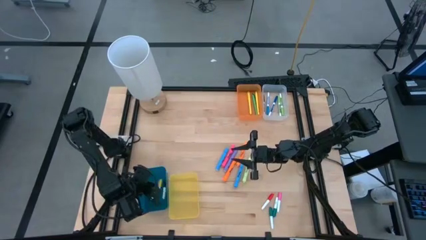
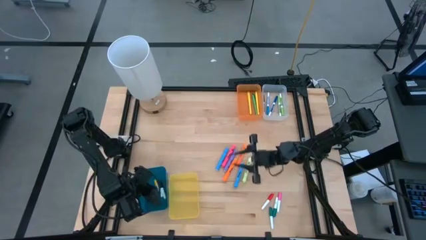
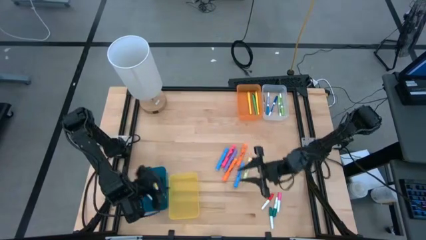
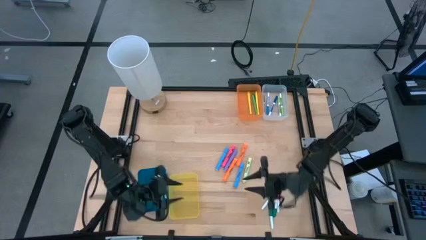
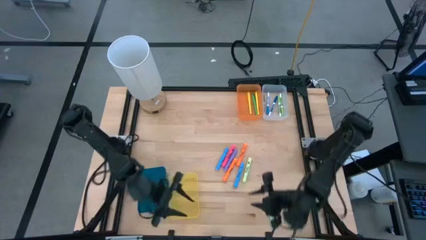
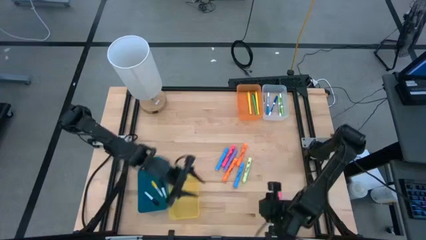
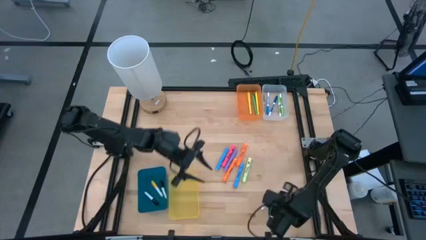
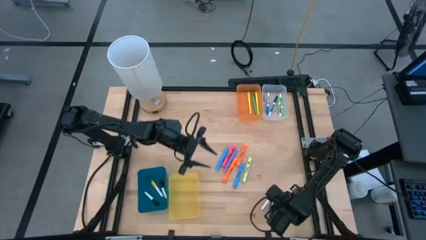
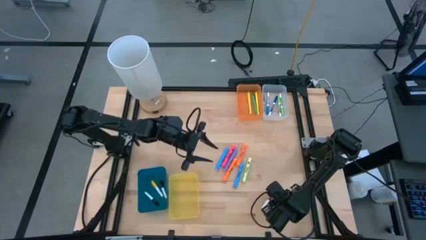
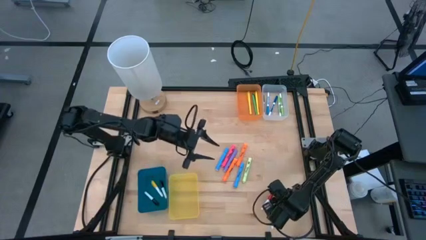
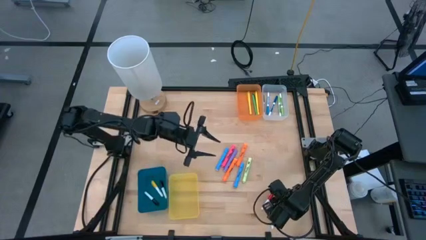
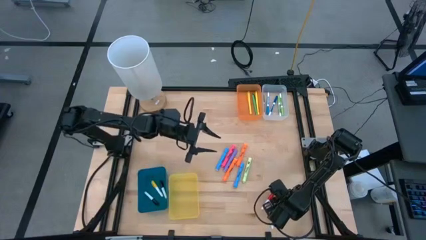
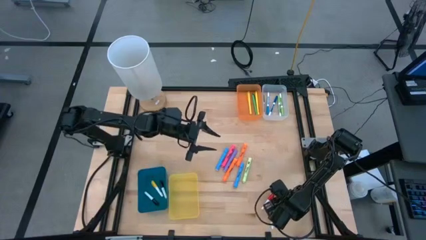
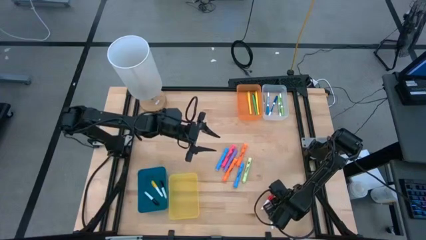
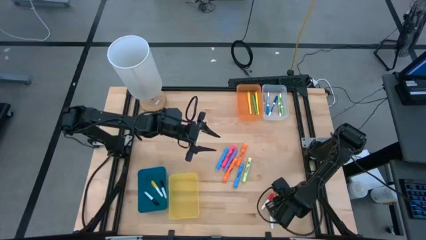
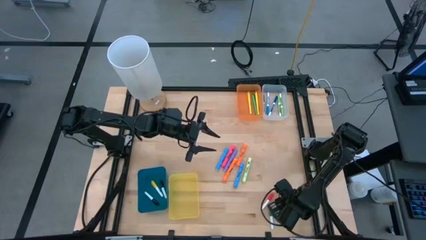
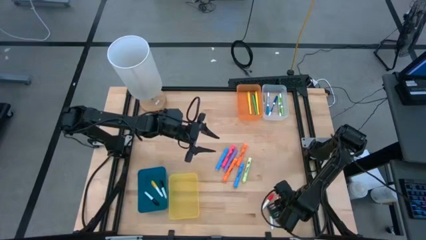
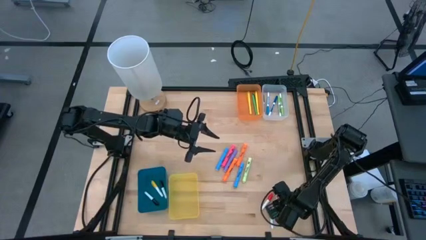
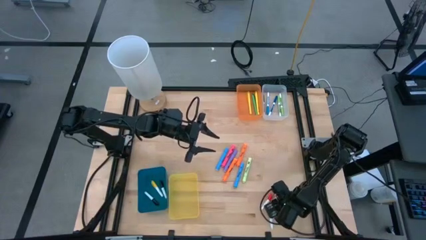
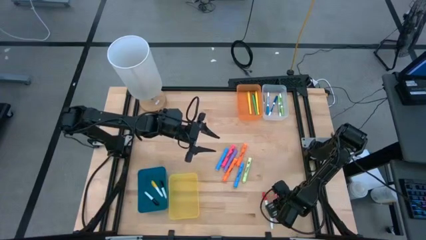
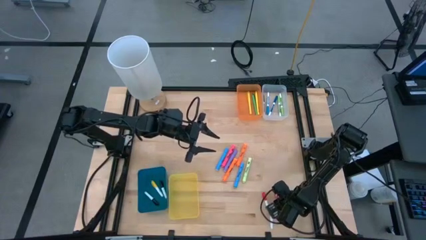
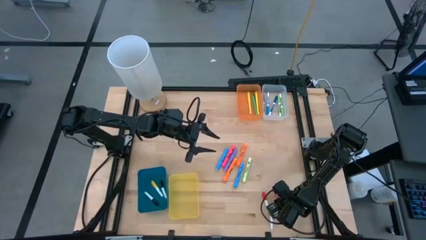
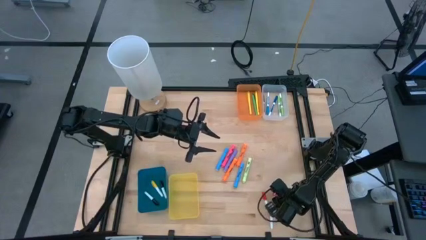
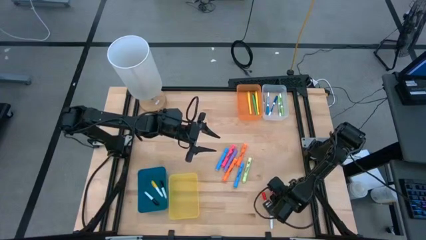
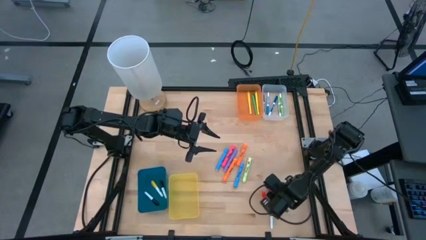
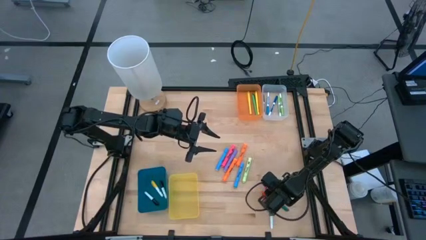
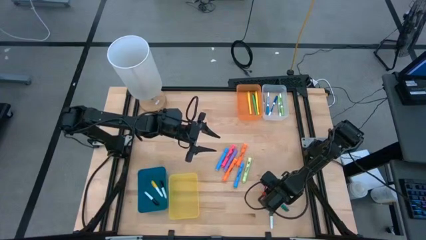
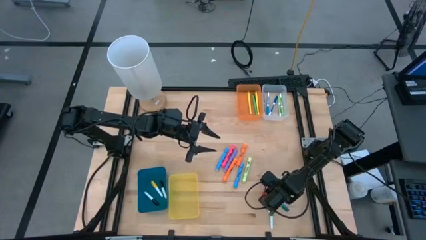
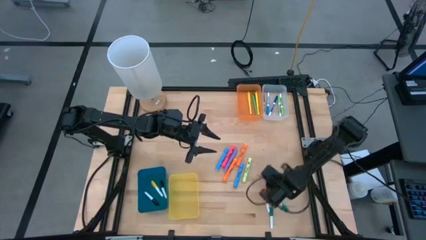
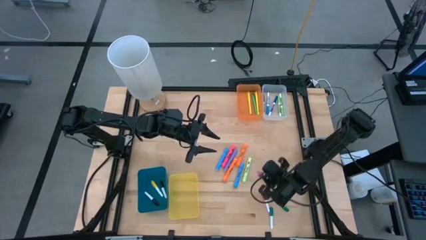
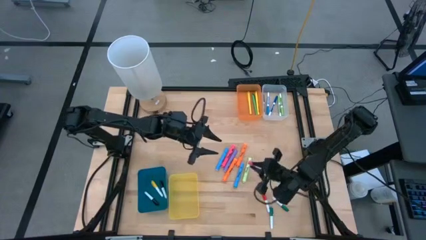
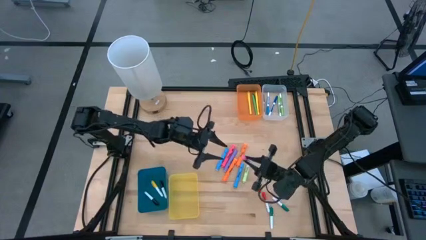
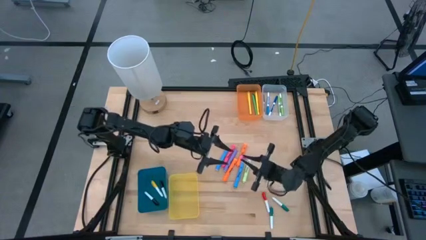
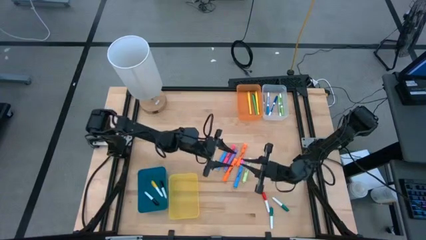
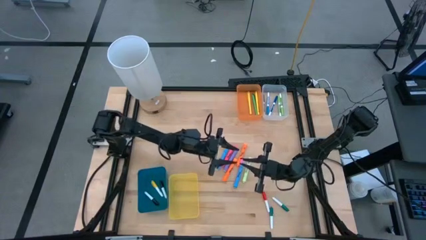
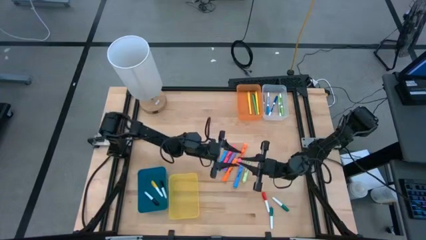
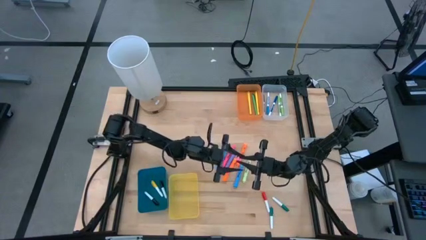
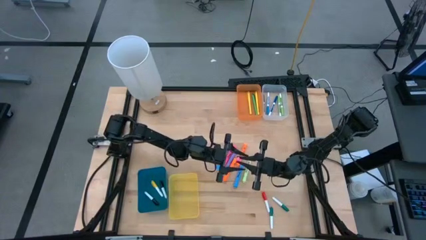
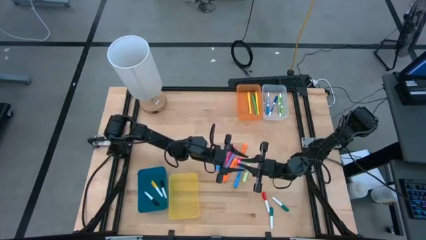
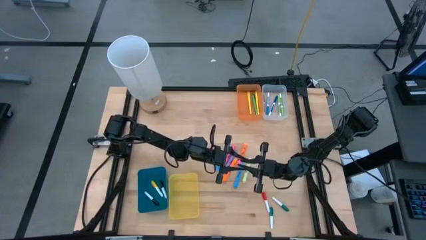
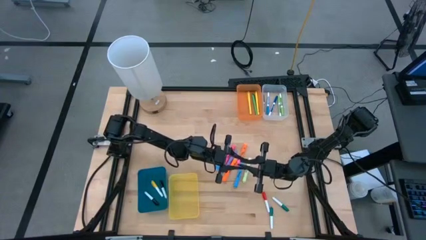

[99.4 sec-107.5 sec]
Task: Pick & Place Markers
Put the white and pink highlighter pen into the blue bin

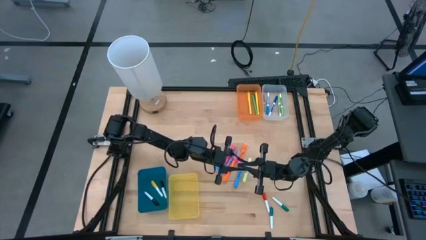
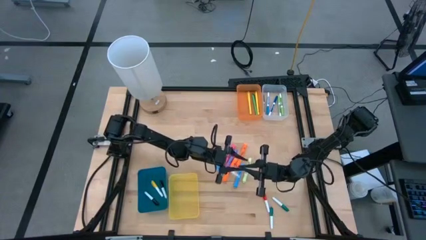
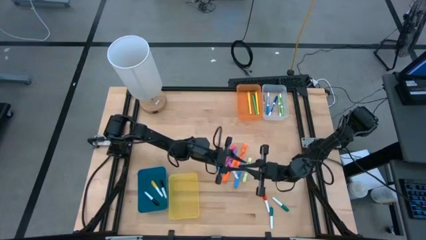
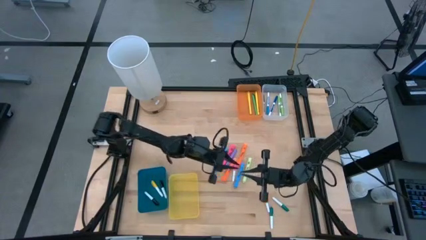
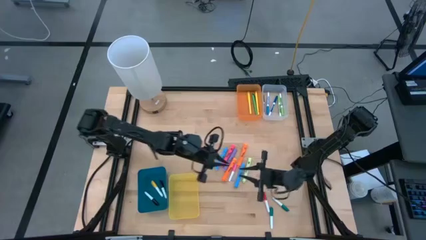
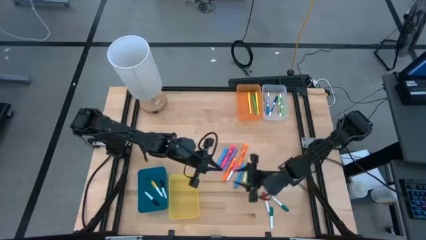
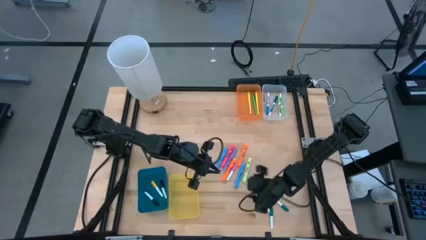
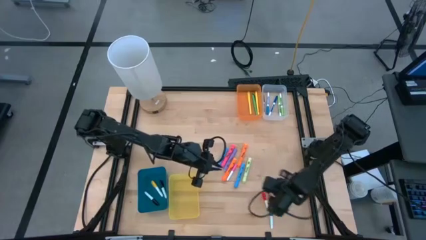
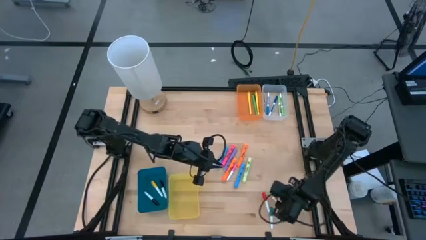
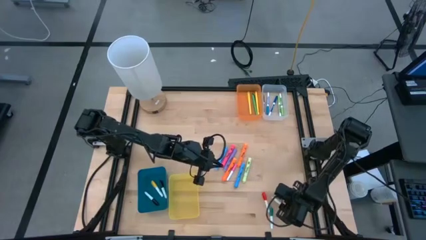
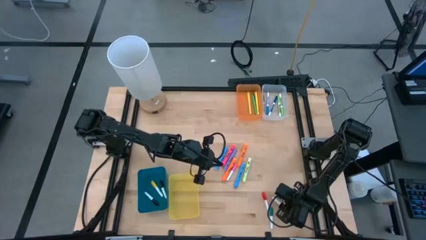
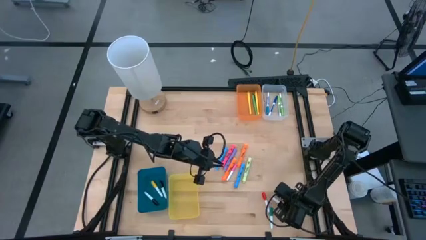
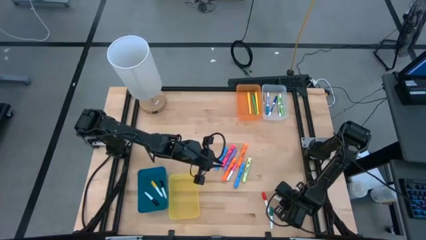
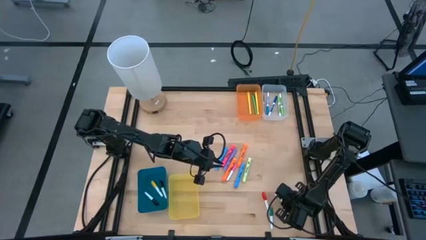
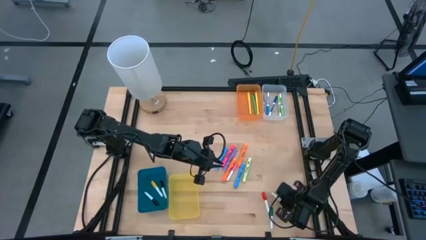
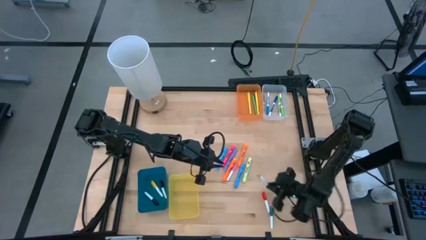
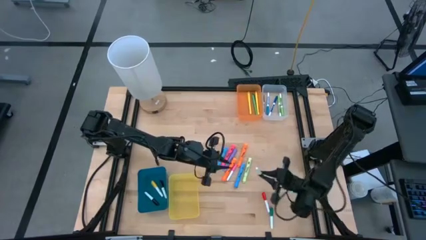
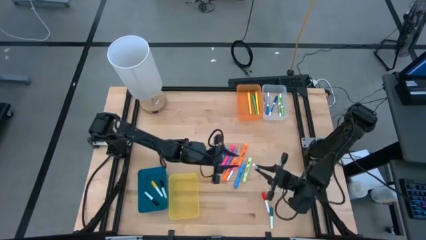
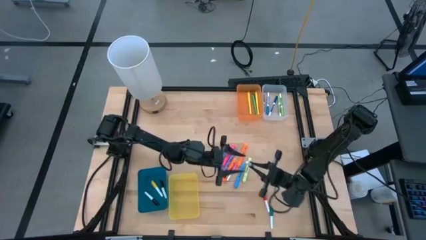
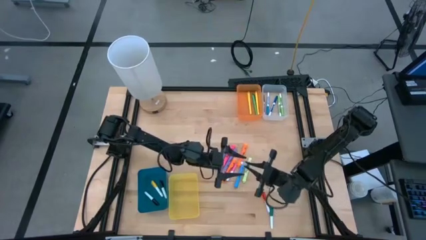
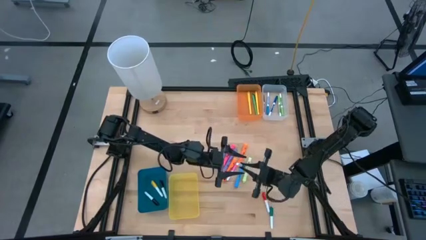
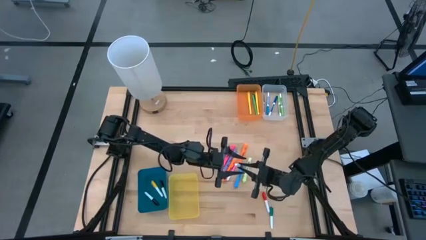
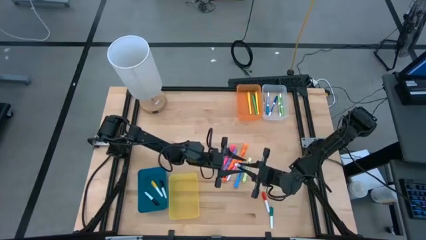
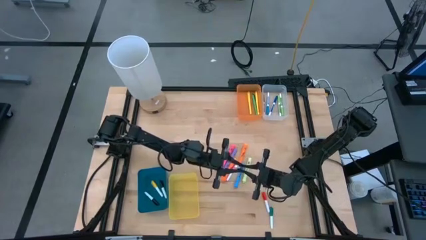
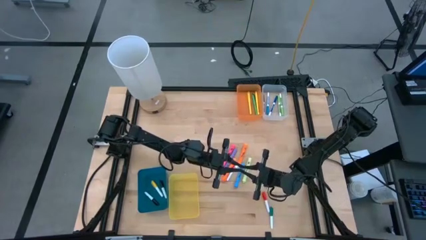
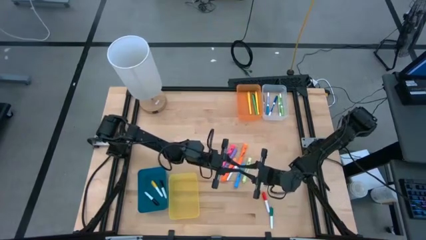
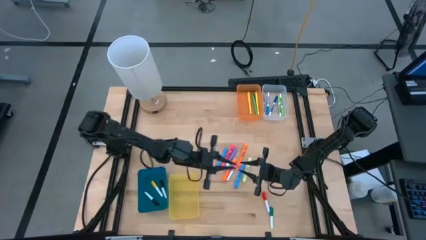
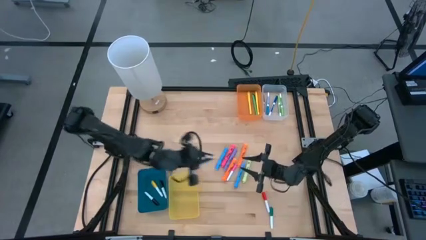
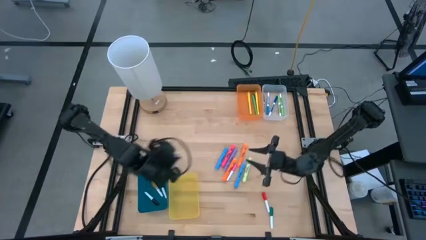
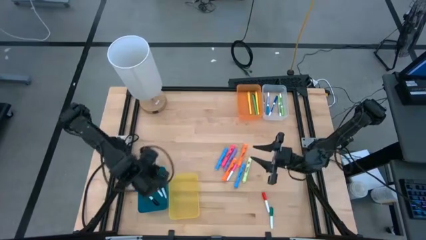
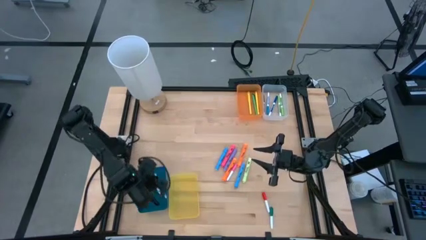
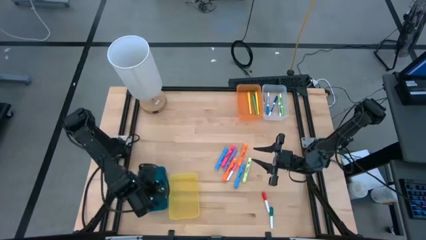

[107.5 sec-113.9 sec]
Put the top white and green highlighter pen into the blue bin
